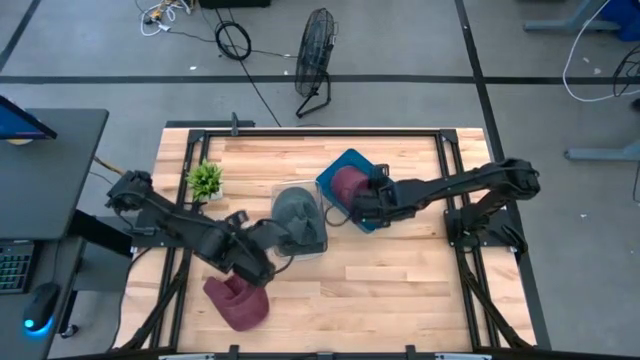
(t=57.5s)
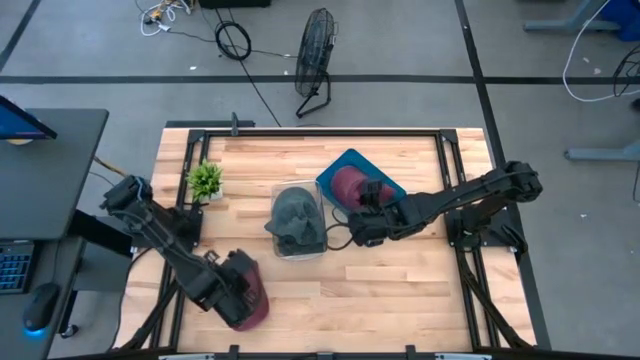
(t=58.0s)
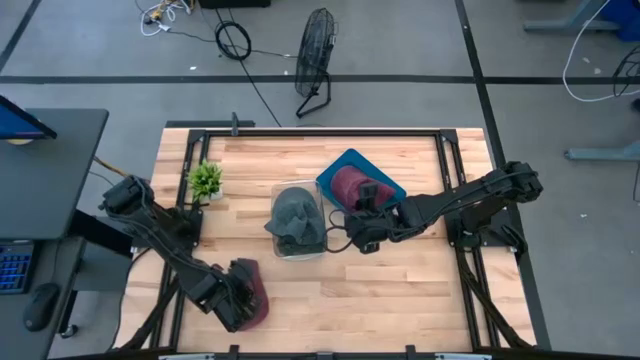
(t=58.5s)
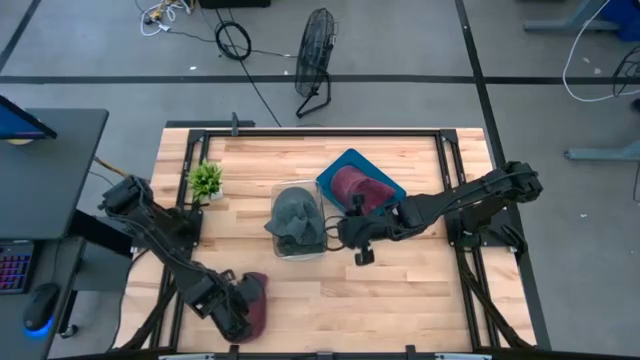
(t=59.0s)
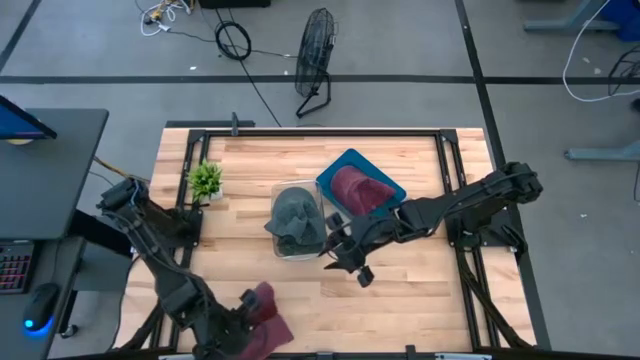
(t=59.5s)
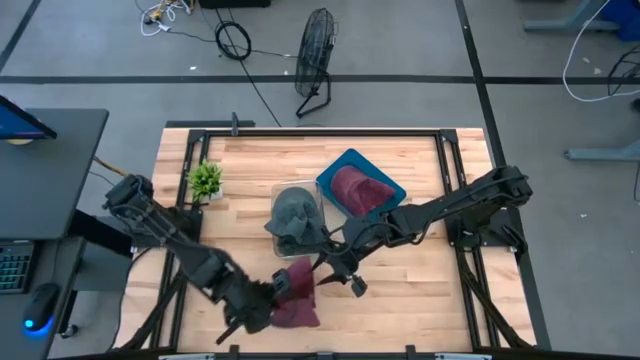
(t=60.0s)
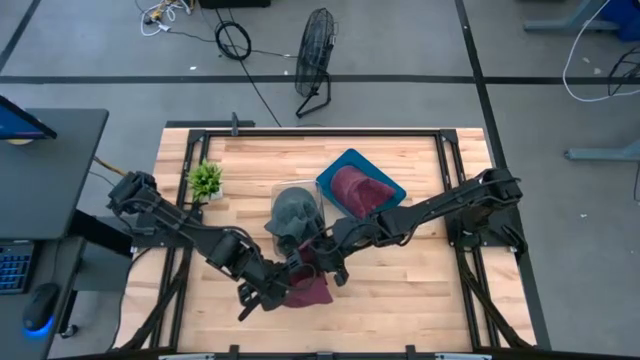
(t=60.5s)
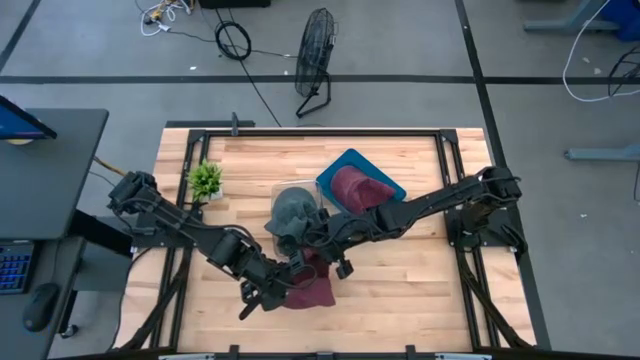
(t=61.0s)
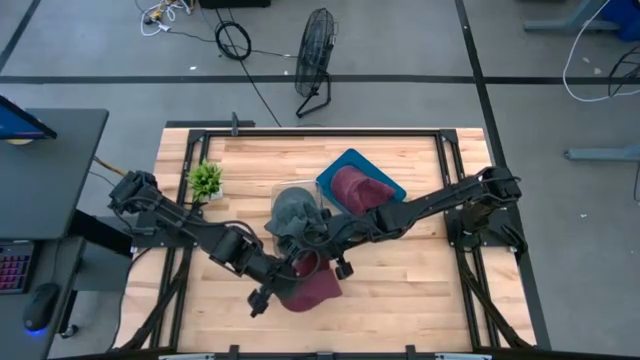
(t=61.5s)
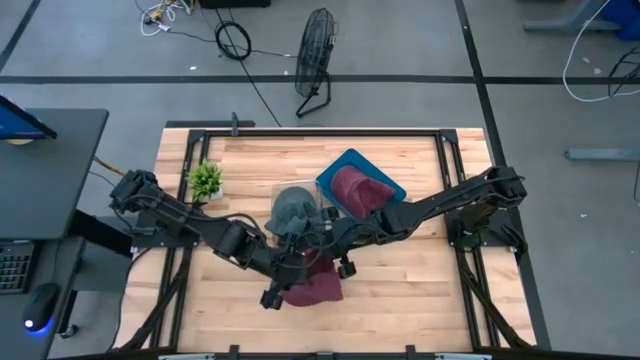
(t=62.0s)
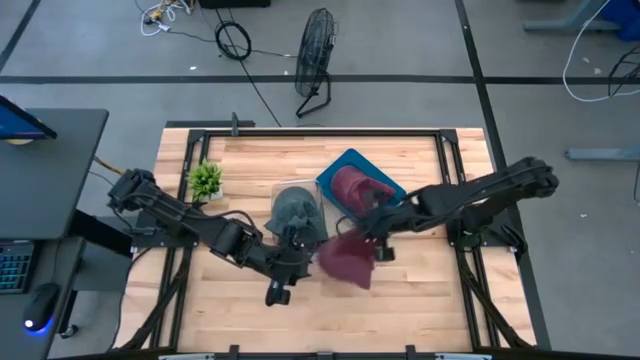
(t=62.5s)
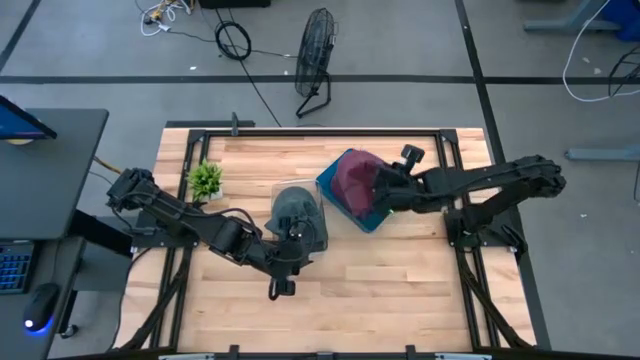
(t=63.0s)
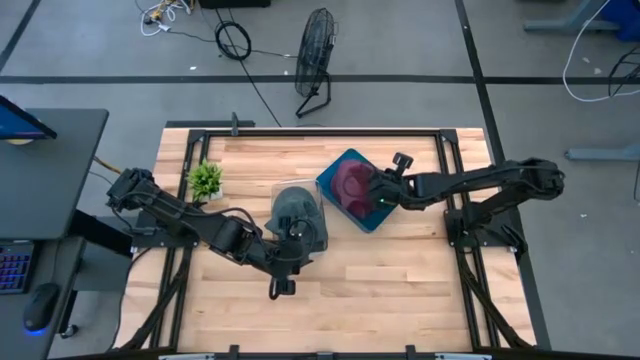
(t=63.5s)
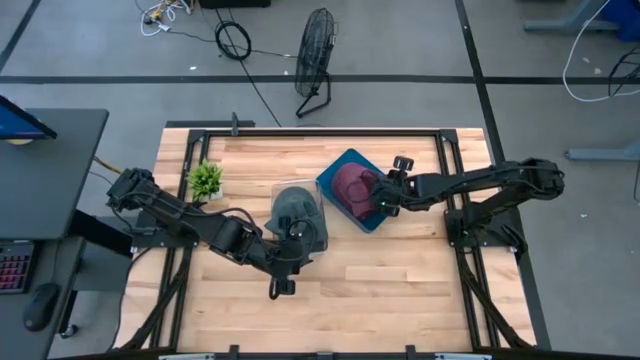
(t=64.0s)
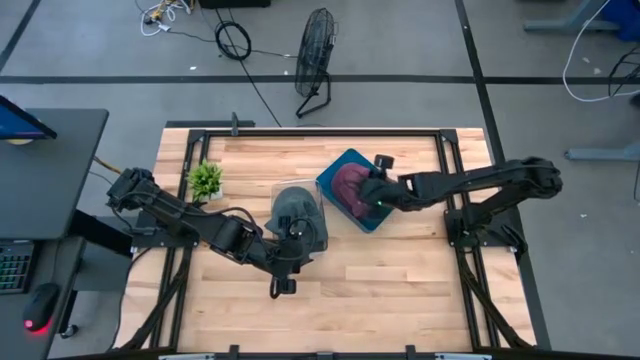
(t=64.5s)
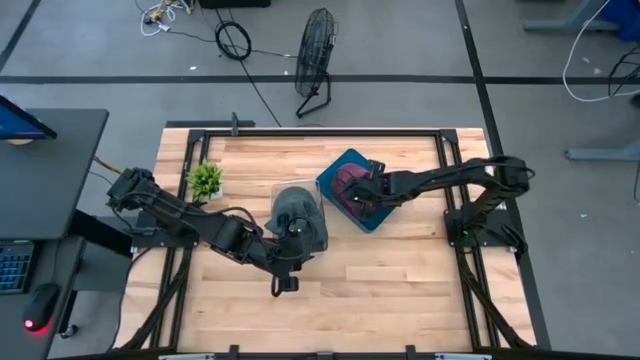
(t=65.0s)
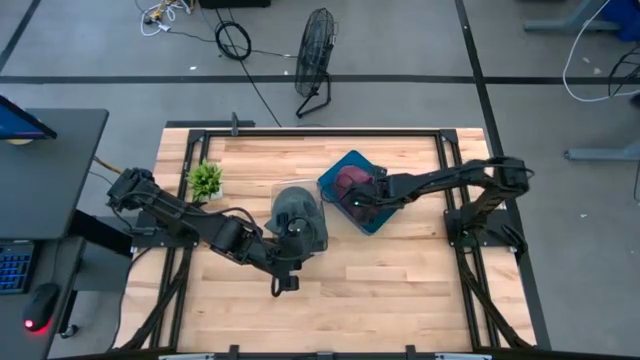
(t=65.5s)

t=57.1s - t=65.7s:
Task: Pick & Place hat
Put the red cap into the blue bin

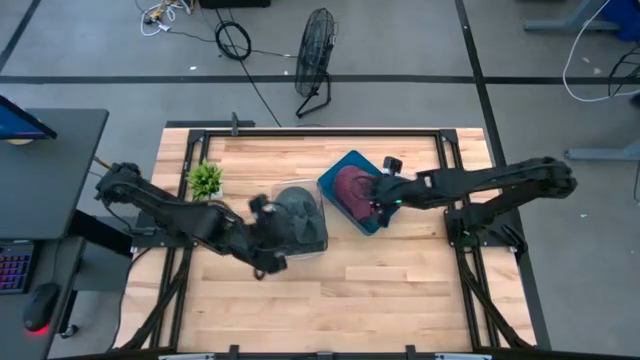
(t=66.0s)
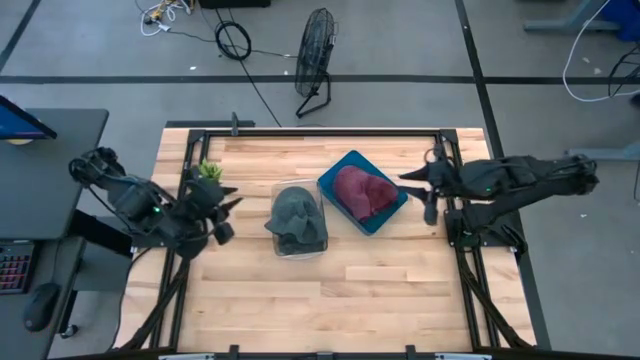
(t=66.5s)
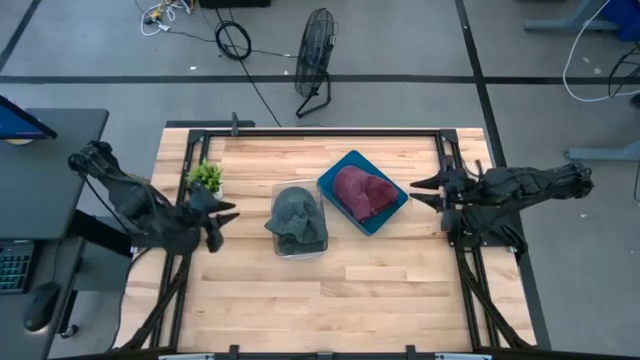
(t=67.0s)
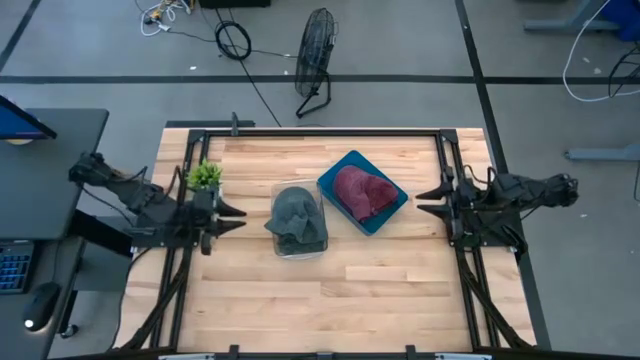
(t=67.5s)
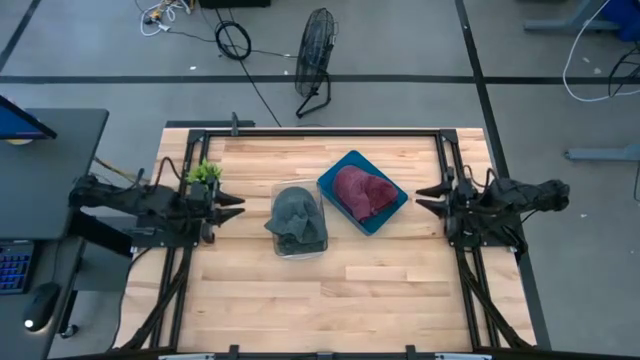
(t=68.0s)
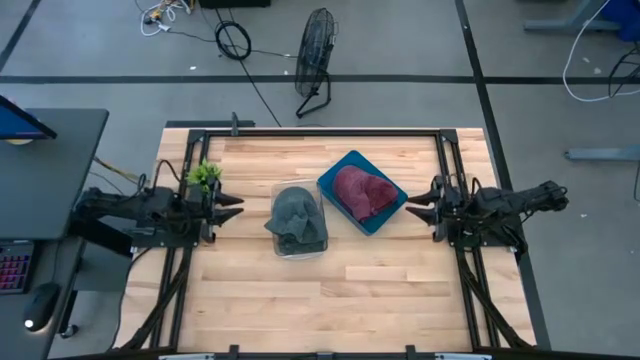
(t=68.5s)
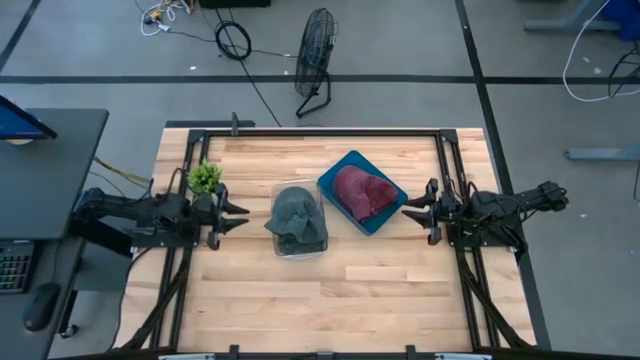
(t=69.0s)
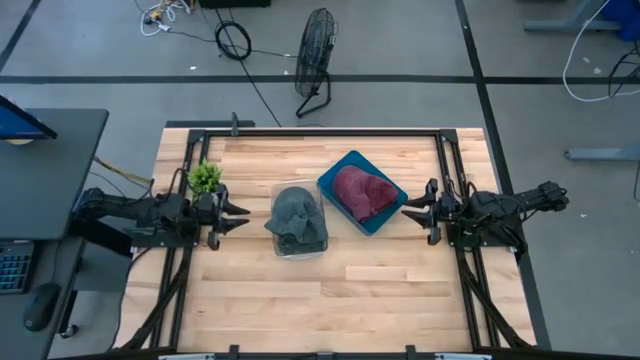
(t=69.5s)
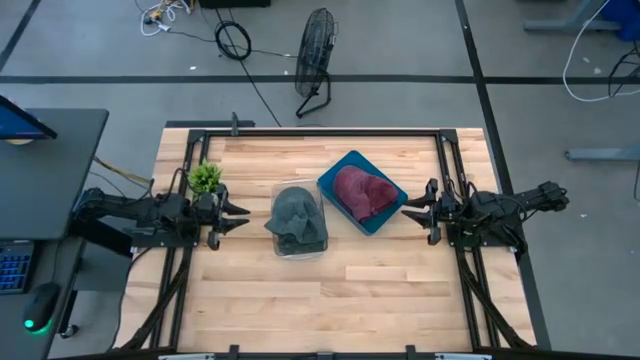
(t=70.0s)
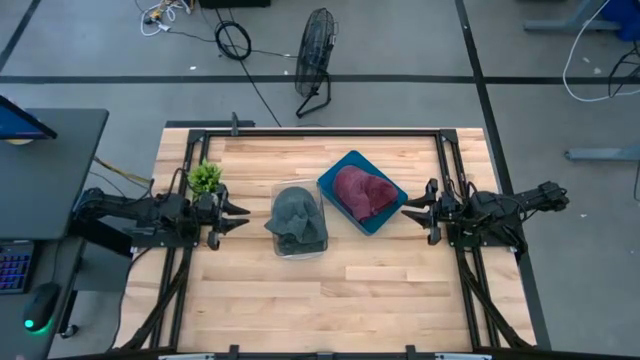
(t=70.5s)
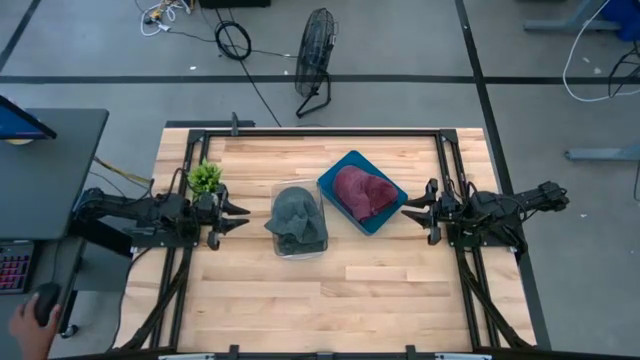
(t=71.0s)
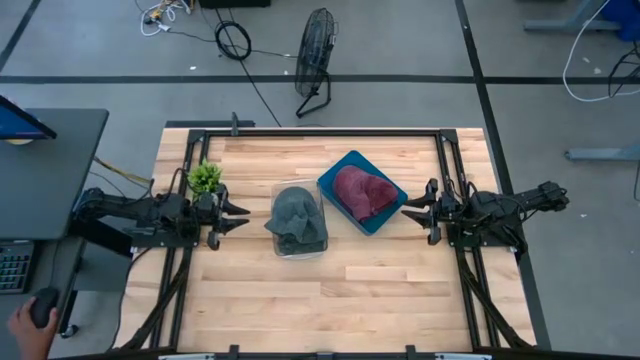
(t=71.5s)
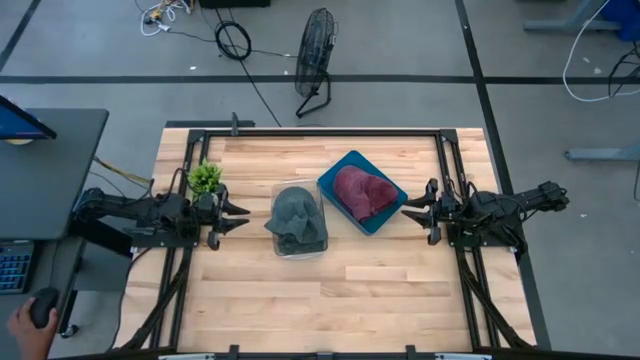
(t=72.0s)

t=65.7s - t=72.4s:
Return to Home Position

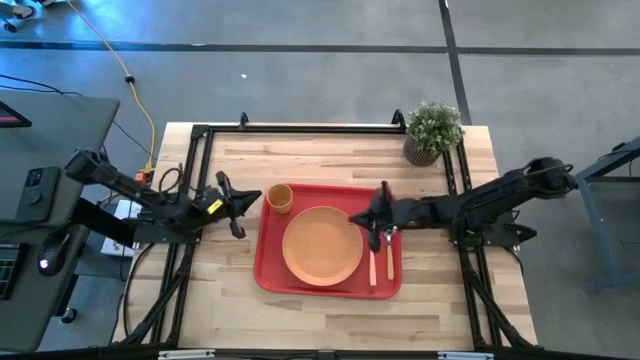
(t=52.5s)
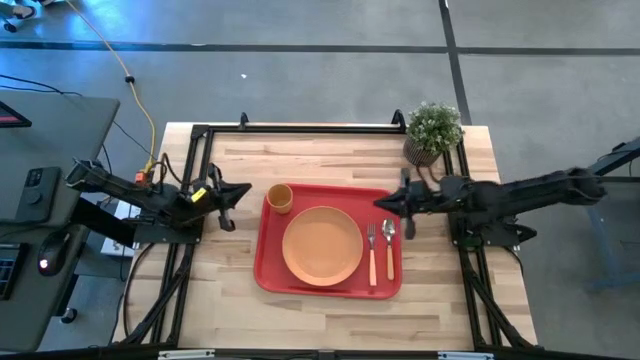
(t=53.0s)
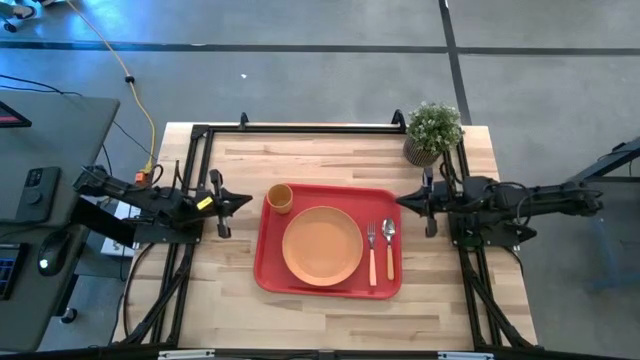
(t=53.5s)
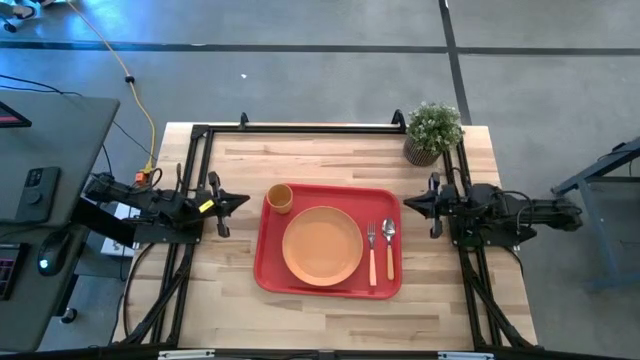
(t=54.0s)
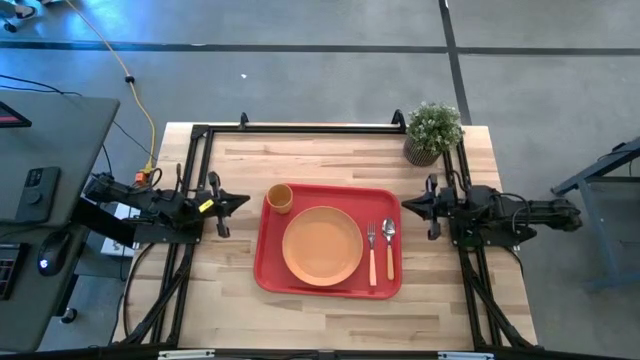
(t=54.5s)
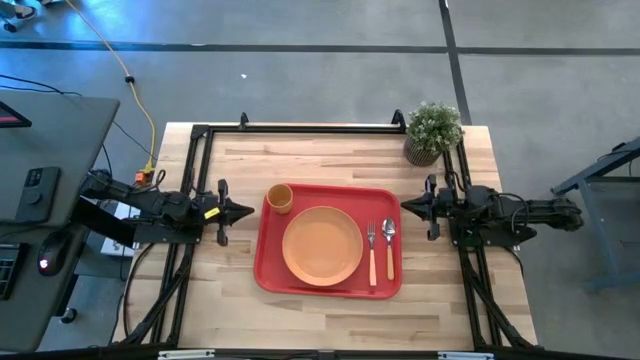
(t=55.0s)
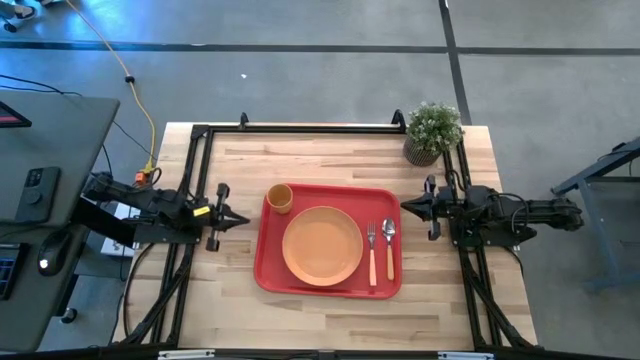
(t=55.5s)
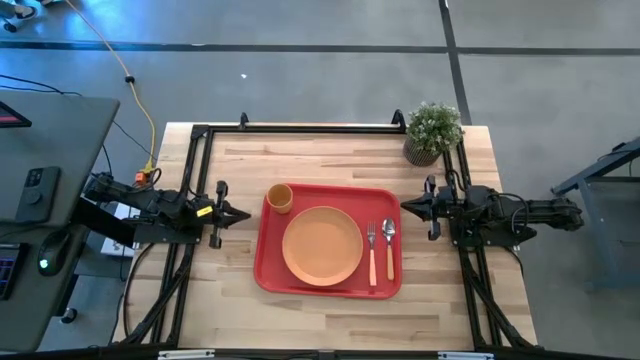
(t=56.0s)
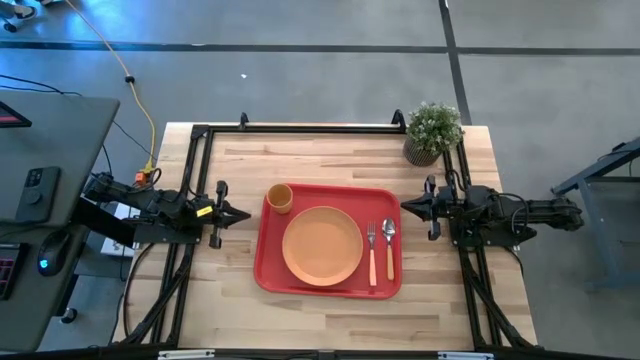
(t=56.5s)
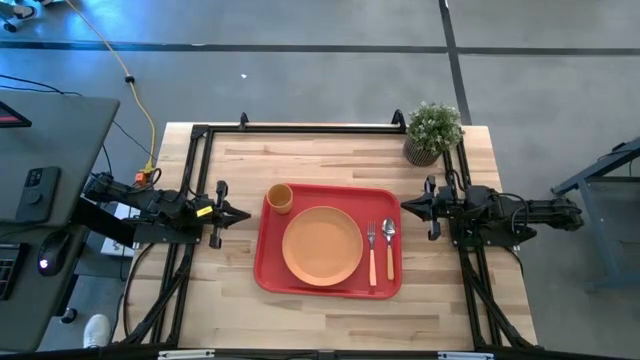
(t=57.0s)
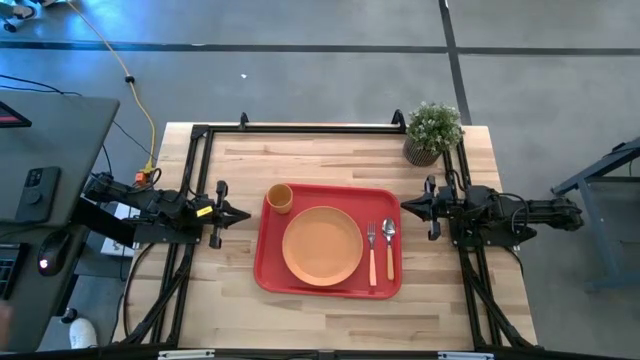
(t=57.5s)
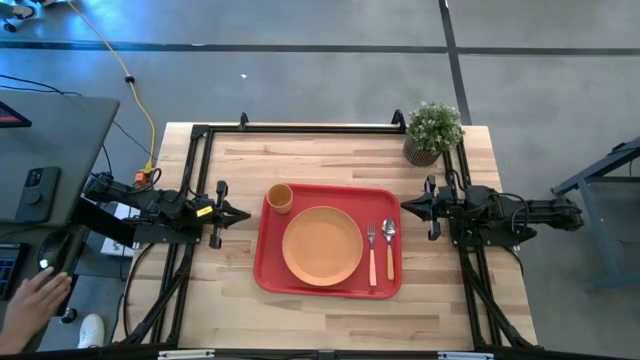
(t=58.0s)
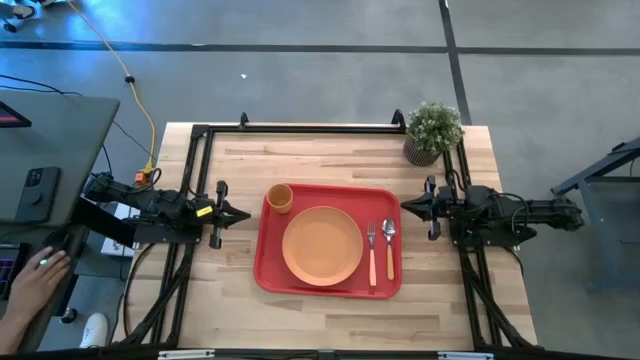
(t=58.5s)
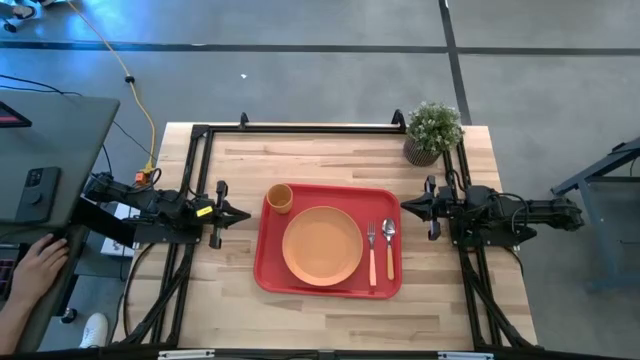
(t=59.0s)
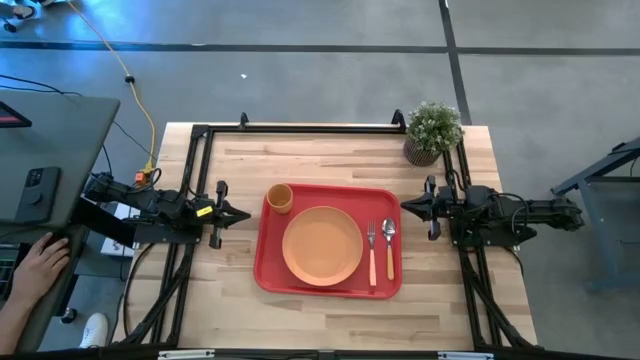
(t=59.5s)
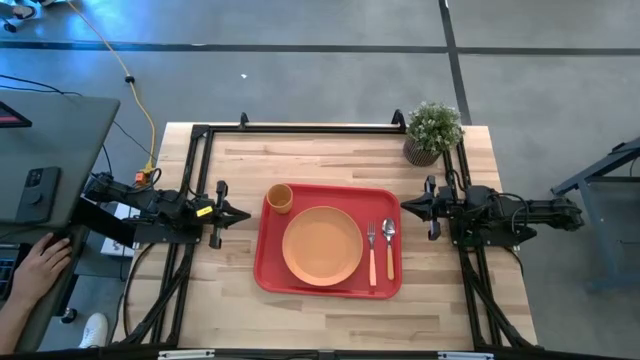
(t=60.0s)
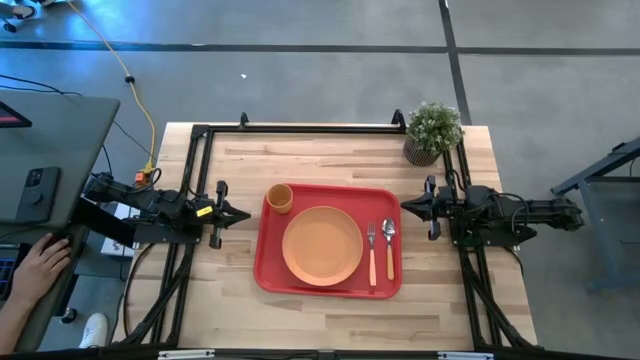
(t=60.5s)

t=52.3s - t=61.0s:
Task: Pick and place plate/cup/fork/spoon on tray
Return to Home Position
